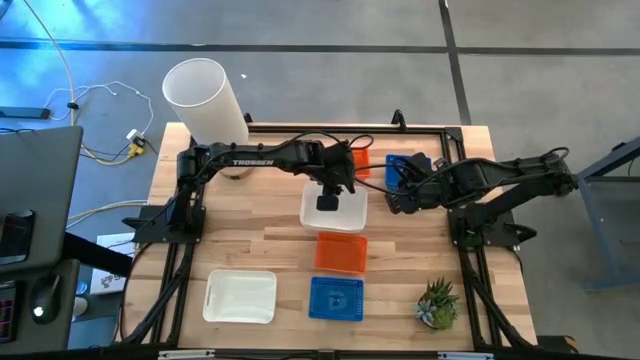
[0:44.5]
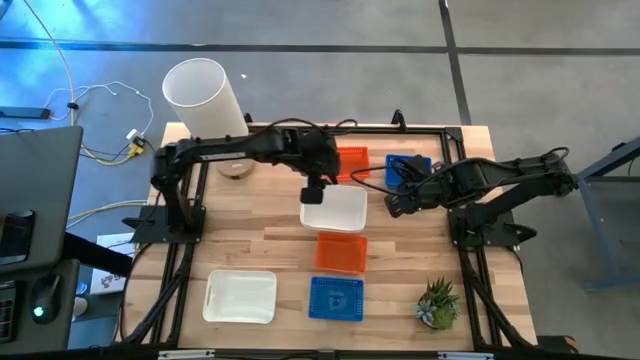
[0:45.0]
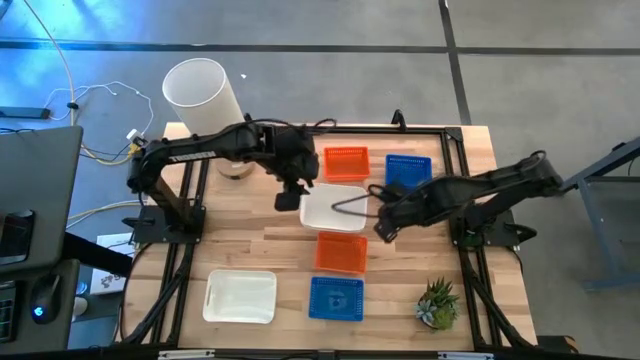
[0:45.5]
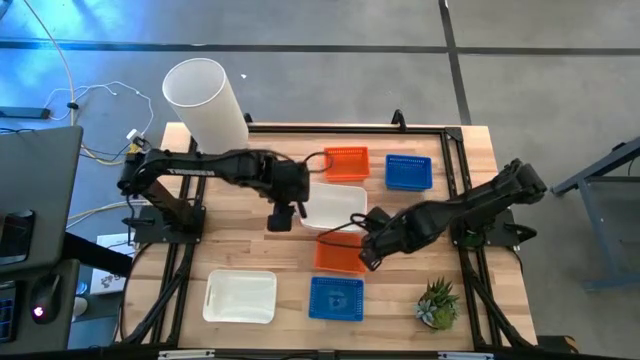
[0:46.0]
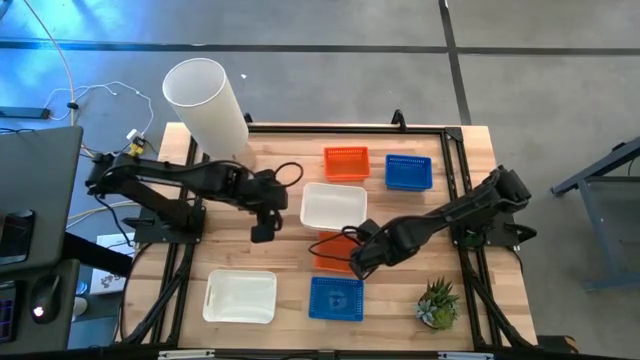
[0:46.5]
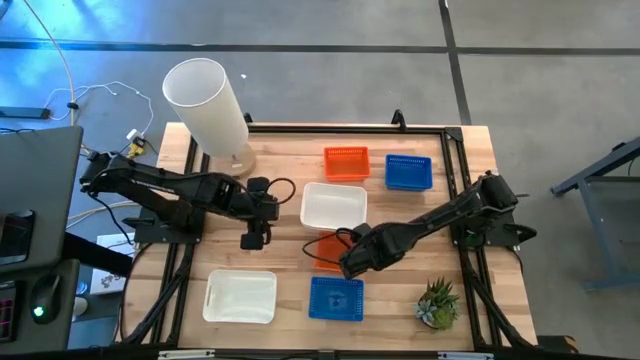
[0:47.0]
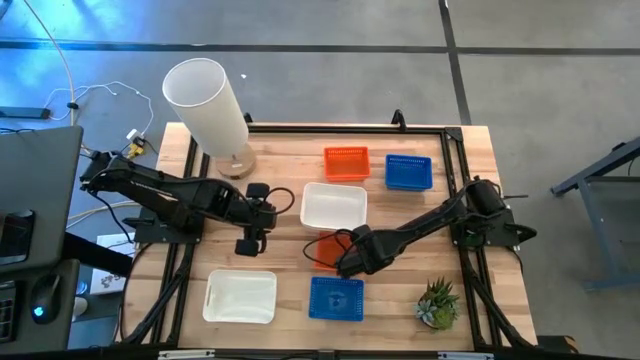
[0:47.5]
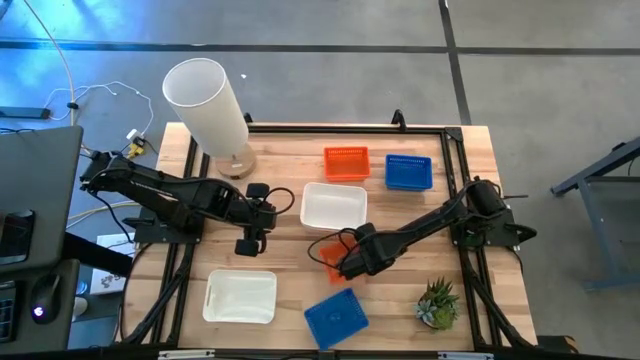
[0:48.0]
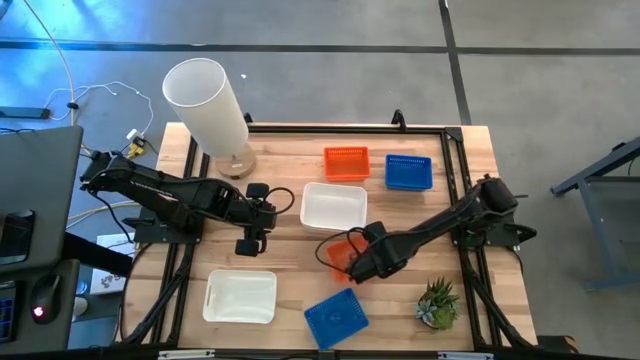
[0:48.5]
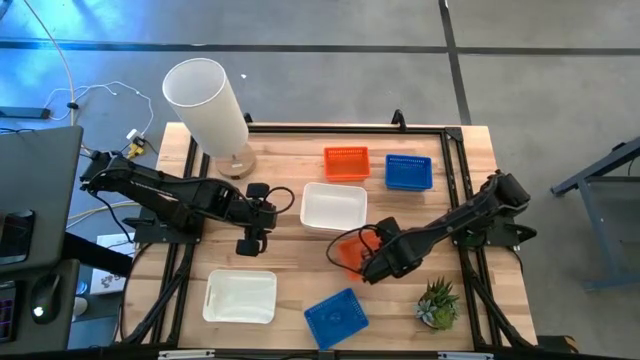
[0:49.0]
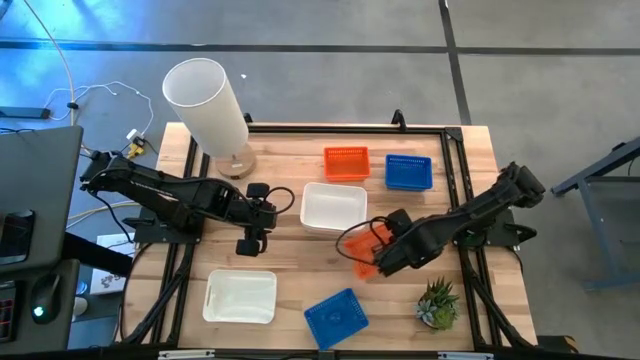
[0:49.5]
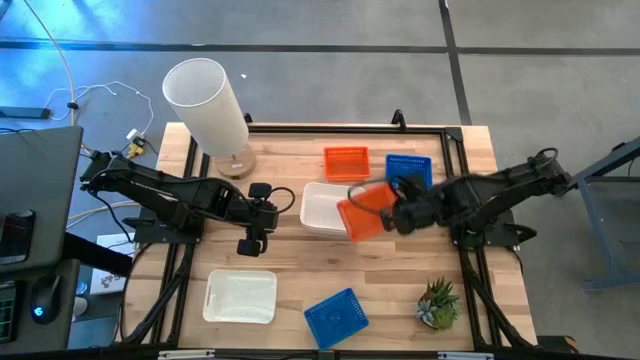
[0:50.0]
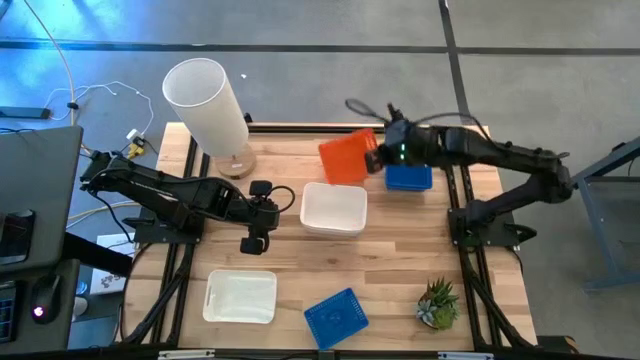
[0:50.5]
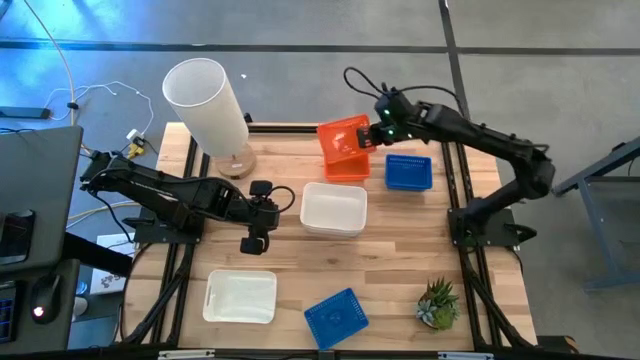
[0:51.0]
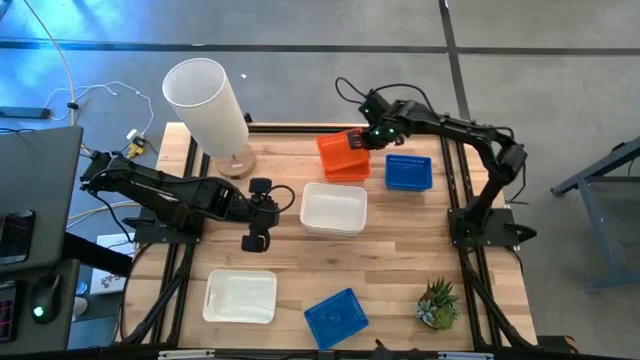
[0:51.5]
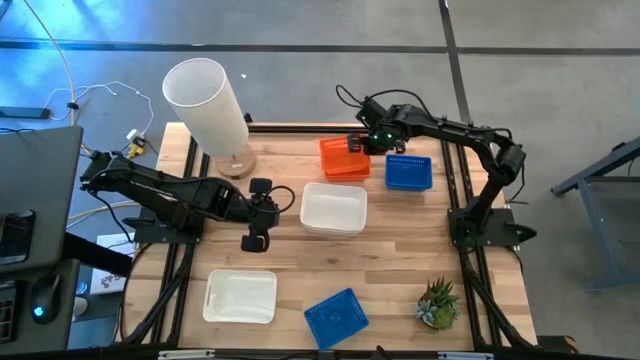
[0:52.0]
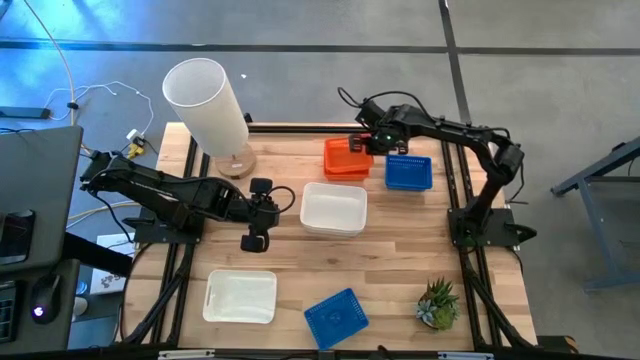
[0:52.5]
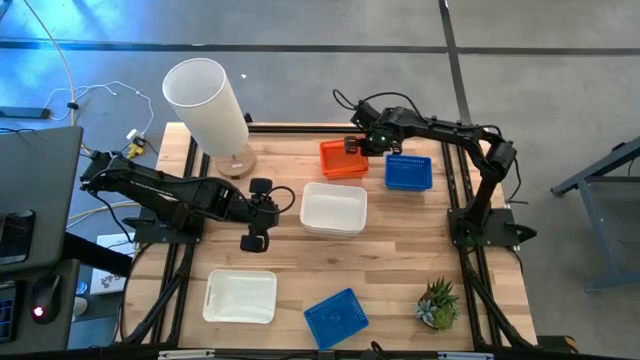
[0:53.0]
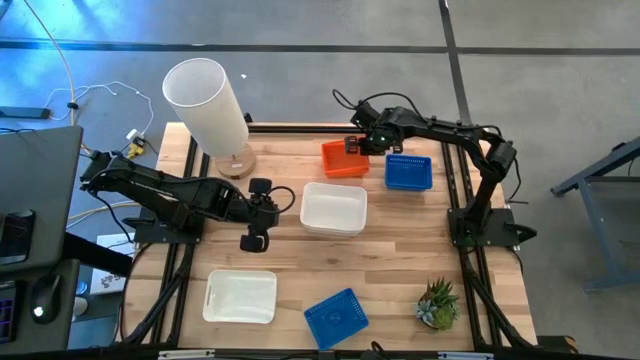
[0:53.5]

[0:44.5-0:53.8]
Stack the bottom orange bin on the top orange bin

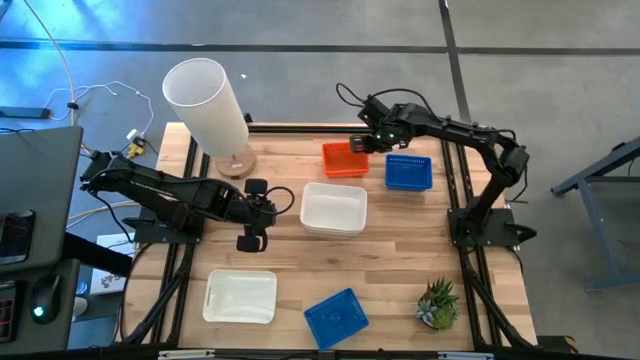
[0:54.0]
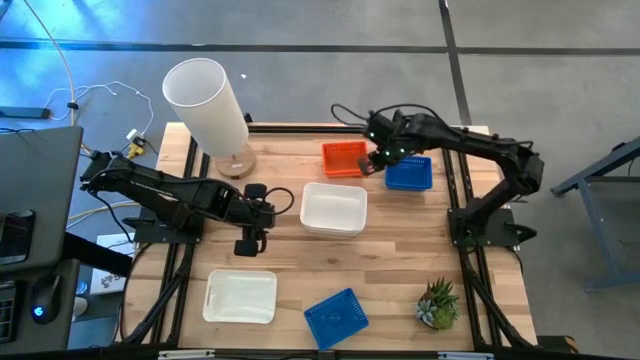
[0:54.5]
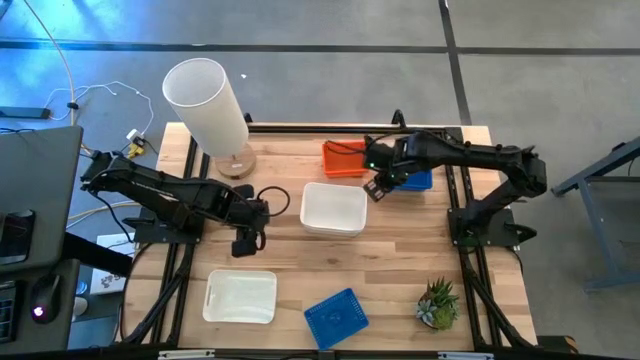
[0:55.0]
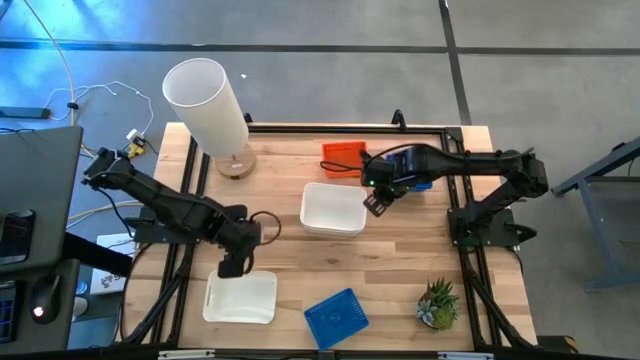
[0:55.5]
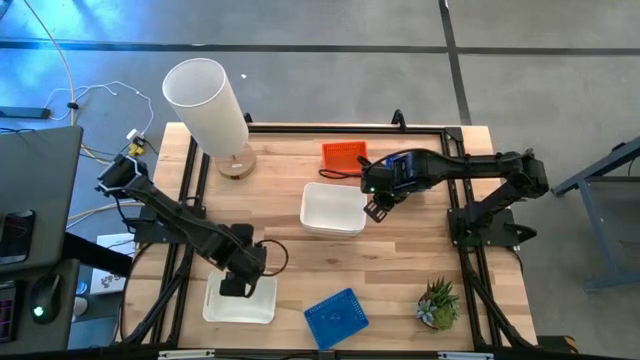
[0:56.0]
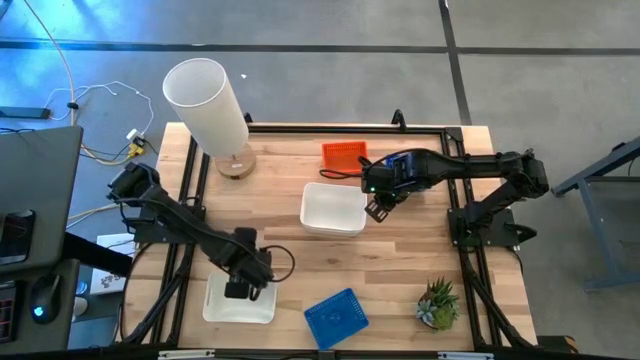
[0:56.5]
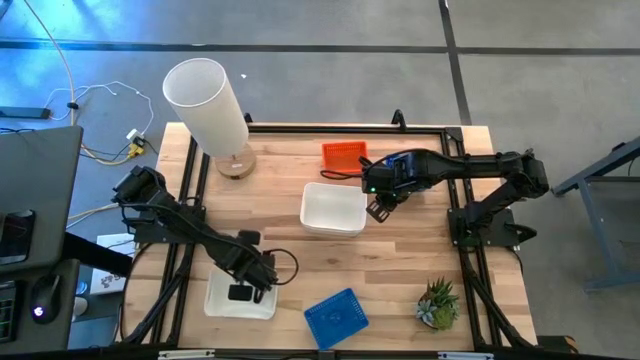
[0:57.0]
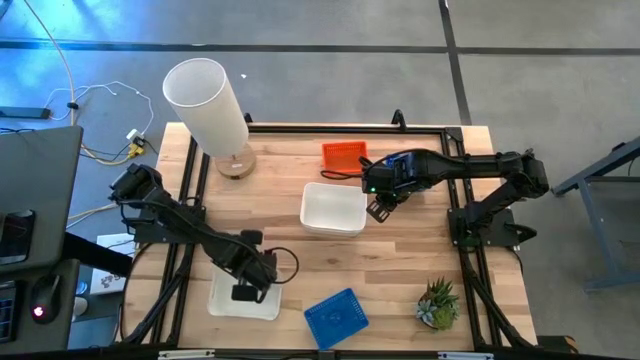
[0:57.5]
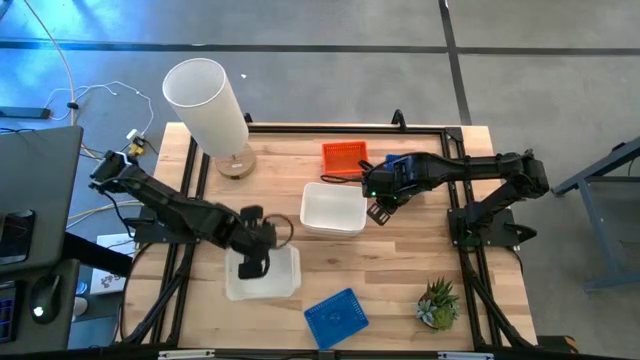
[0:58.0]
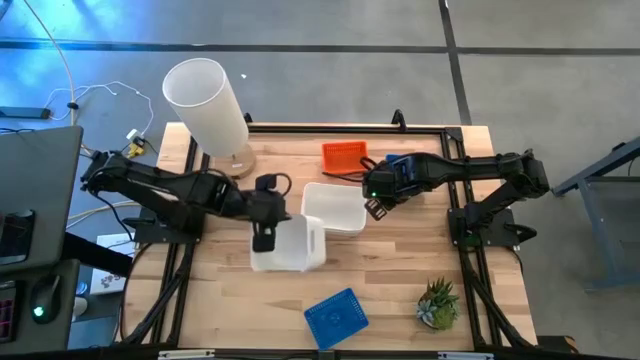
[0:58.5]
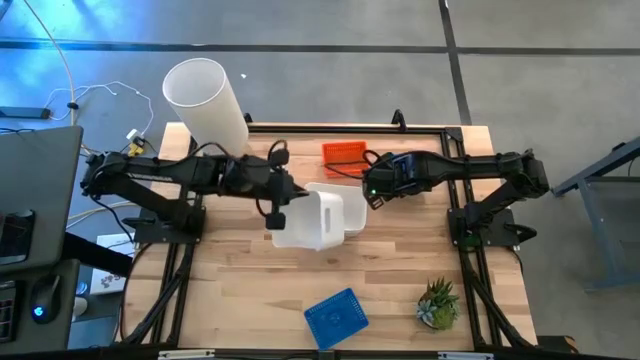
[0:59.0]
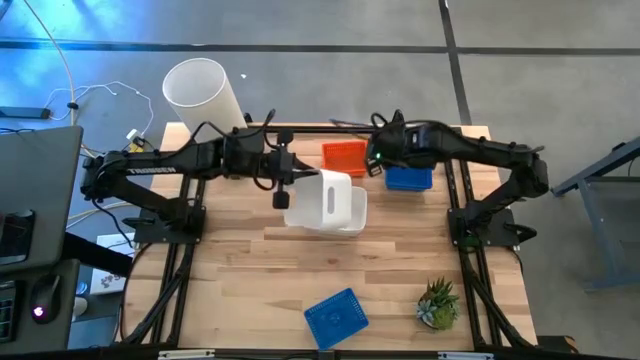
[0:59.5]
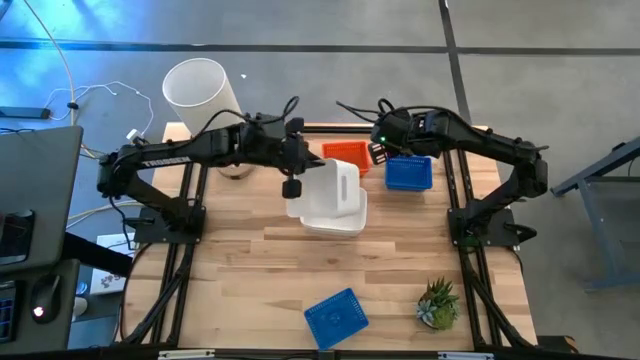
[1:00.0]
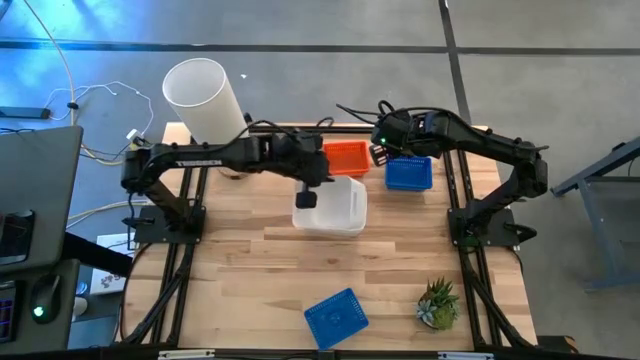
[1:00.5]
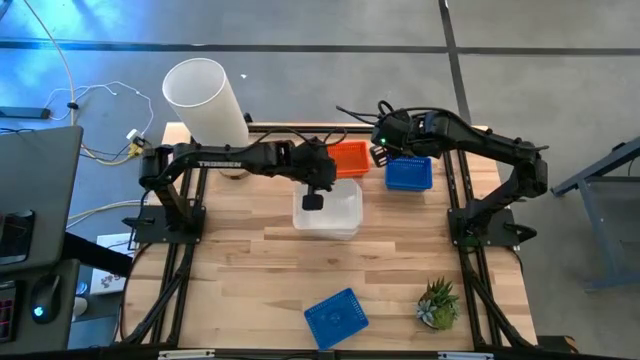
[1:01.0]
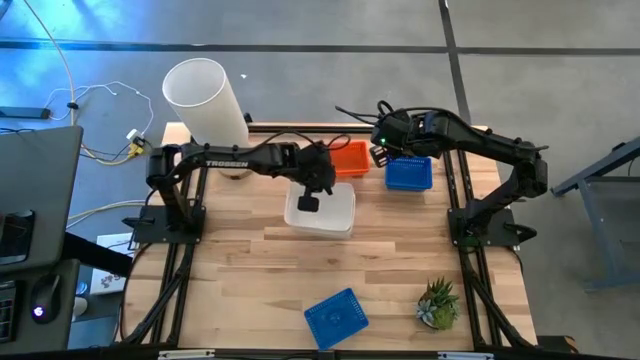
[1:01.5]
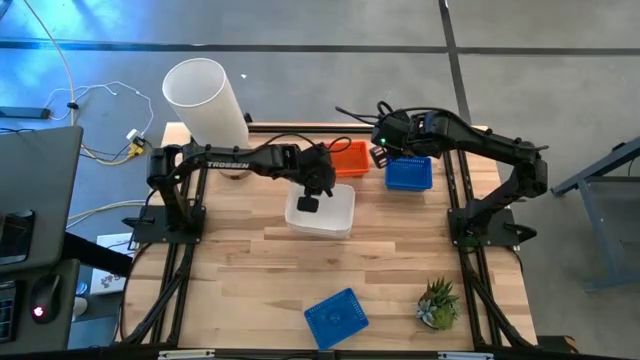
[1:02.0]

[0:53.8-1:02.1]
Stack the bottom white bin on the top white bin
